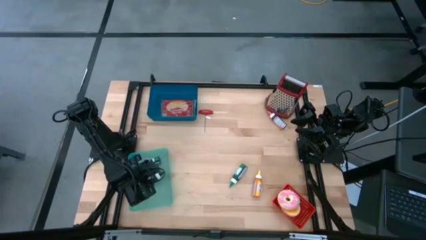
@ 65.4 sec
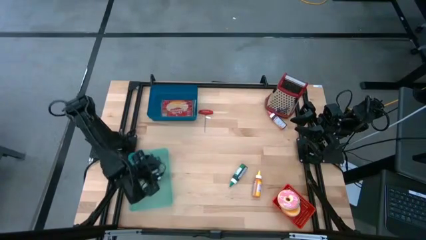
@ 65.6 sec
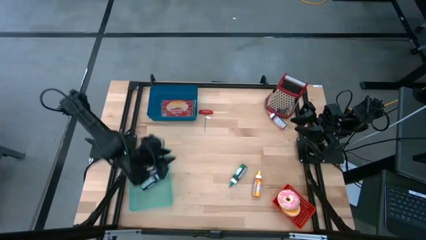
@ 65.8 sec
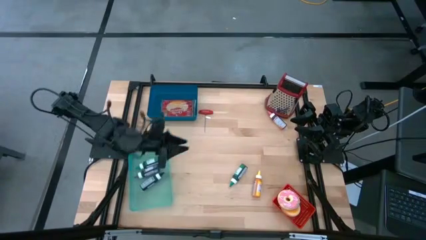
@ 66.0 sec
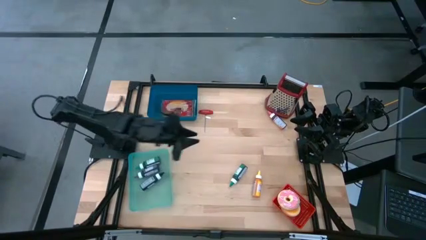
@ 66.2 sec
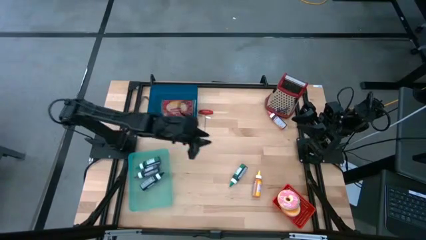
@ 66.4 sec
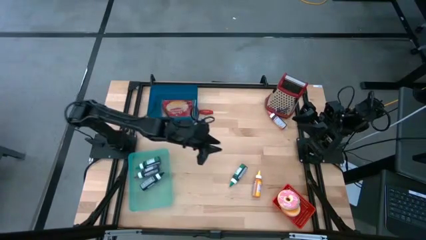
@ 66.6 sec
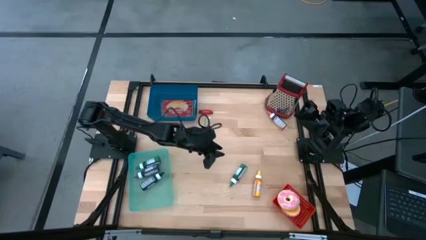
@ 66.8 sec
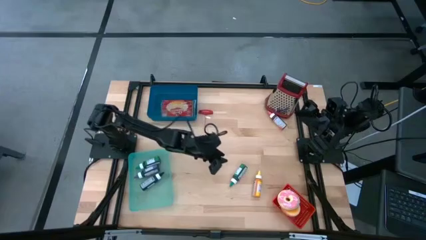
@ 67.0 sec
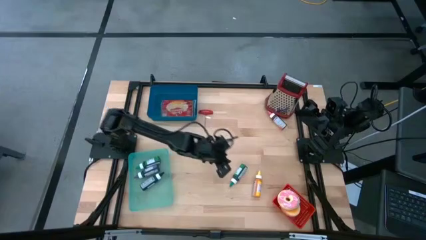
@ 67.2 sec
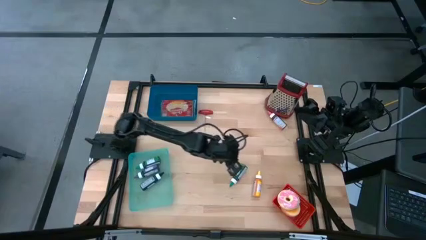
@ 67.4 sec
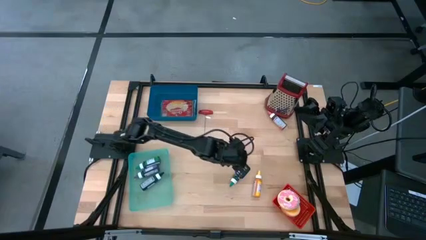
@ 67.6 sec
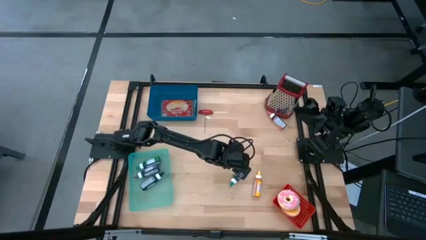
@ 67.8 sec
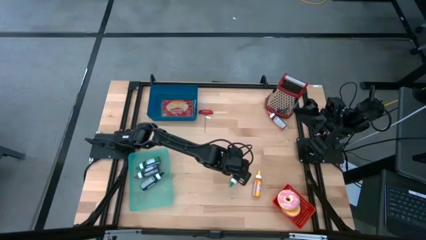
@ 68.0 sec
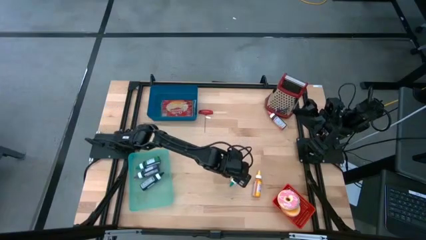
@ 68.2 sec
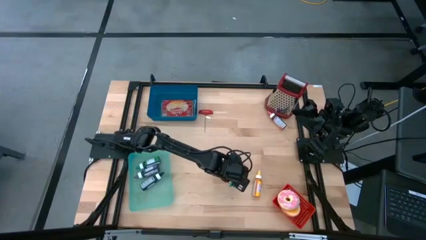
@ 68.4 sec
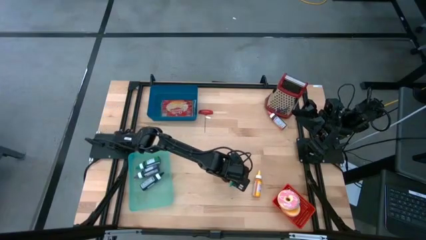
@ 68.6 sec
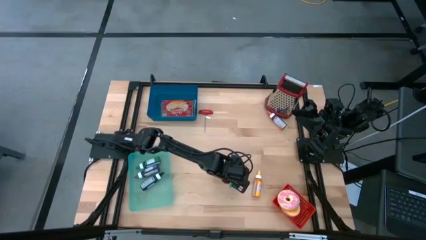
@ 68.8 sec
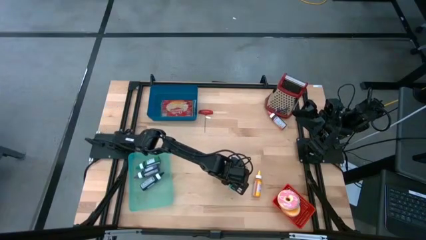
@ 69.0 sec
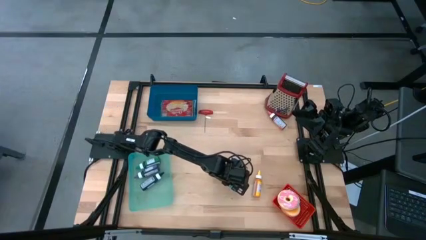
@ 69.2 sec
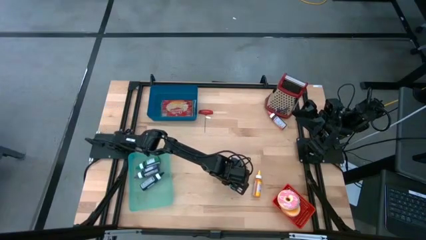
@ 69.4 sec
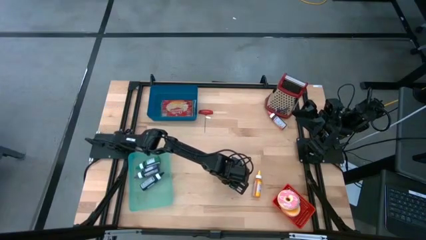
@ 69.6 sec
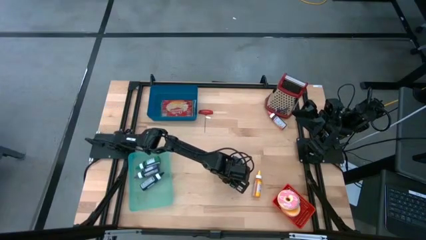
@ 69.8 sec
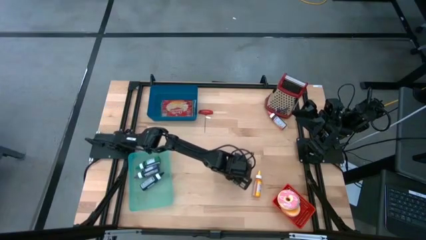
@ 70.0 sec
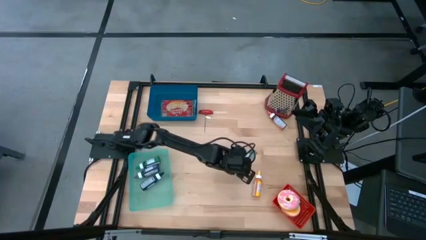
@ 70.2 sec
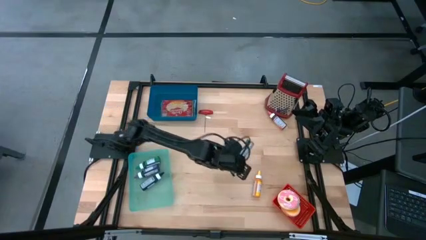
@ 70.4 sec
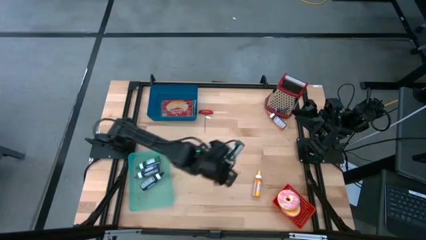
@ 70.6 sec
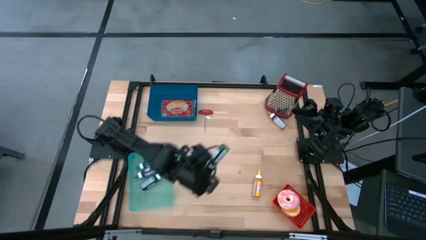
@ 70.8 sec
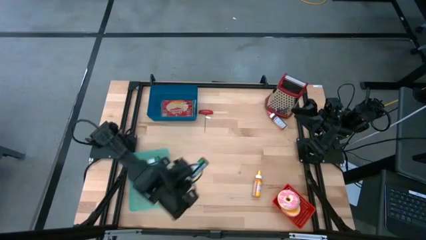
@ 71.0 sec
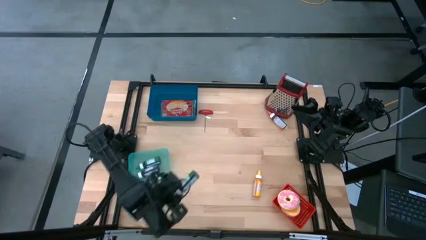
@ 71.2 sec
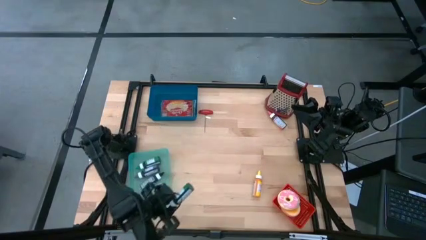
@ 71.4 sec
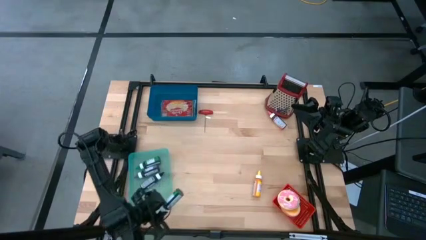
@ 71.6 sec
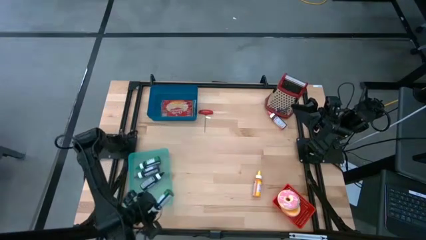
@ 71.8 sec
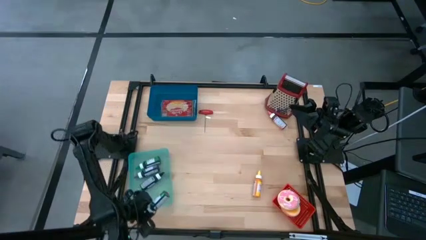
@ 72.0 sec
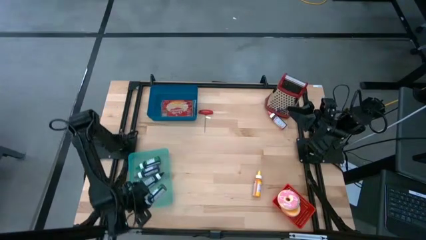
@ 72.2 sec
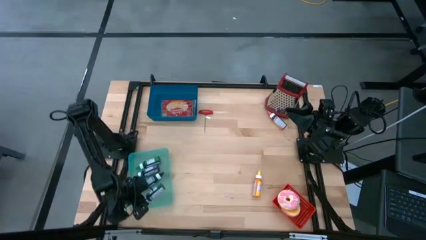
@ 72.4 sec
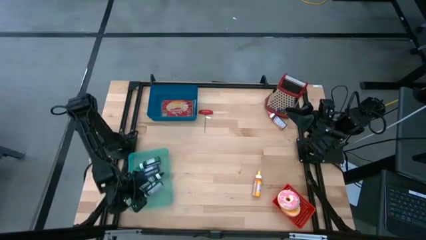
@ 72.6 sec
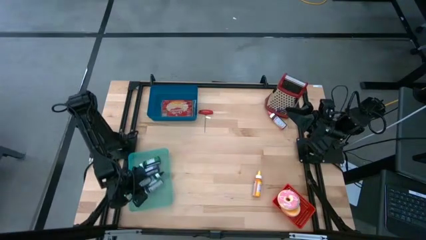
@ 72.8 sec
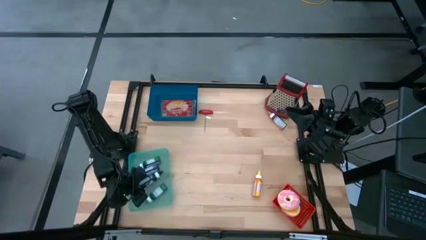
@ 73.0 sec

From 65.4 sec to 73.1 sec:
Put the green food coloring bottle into the green bin

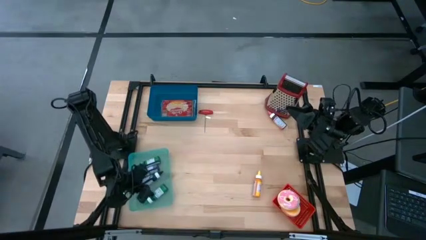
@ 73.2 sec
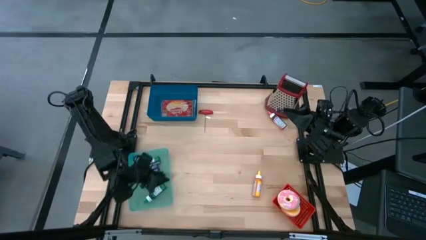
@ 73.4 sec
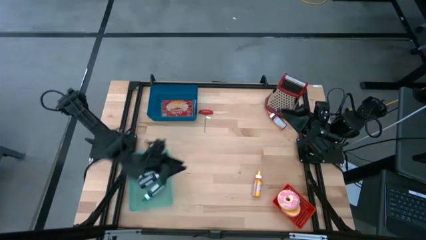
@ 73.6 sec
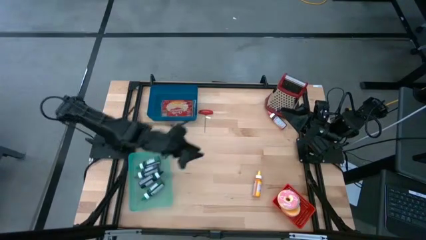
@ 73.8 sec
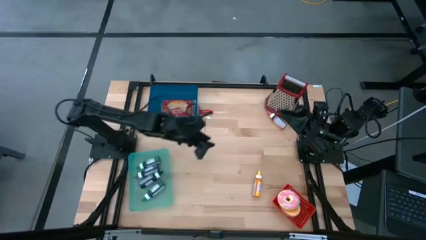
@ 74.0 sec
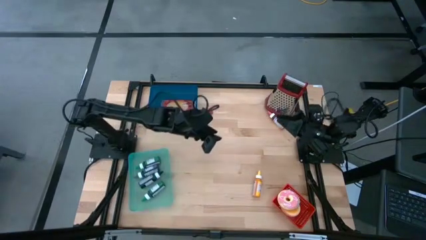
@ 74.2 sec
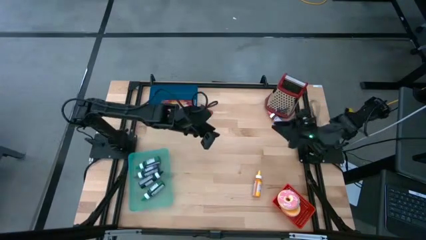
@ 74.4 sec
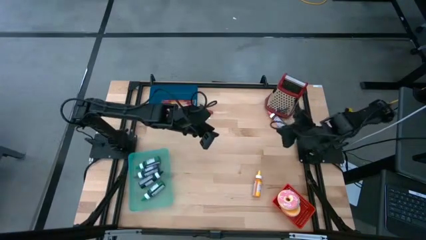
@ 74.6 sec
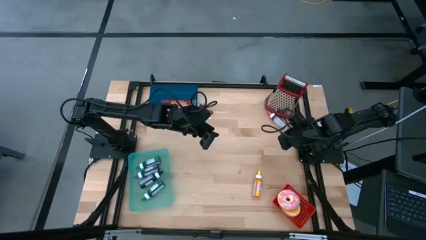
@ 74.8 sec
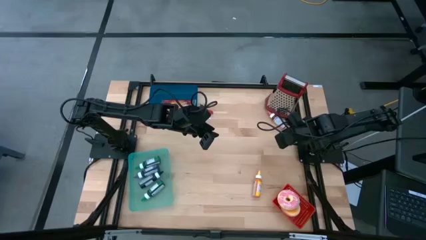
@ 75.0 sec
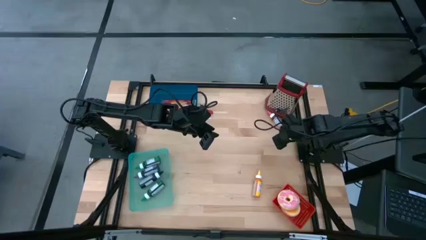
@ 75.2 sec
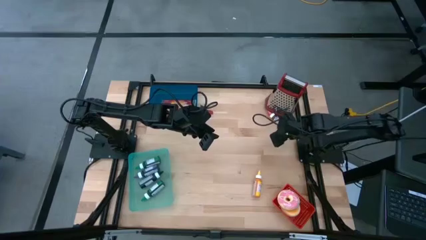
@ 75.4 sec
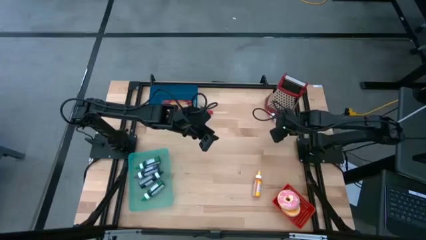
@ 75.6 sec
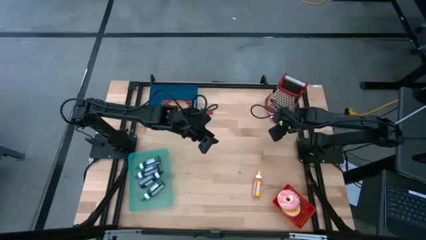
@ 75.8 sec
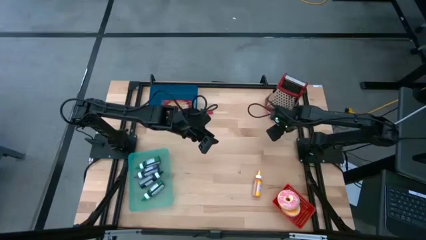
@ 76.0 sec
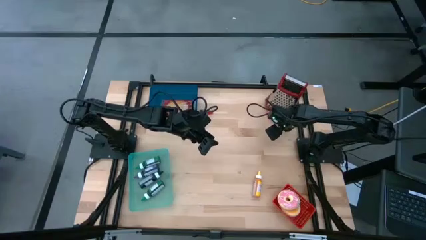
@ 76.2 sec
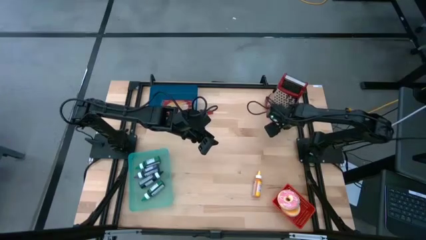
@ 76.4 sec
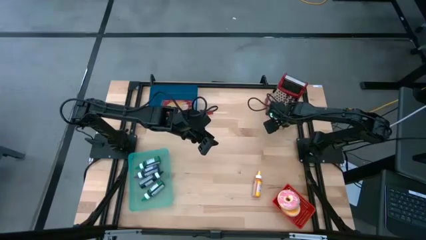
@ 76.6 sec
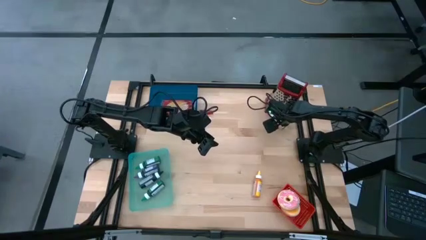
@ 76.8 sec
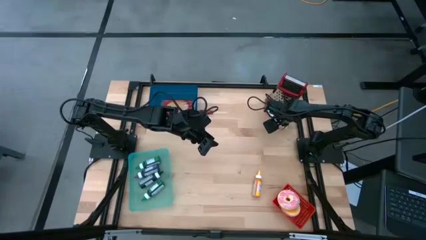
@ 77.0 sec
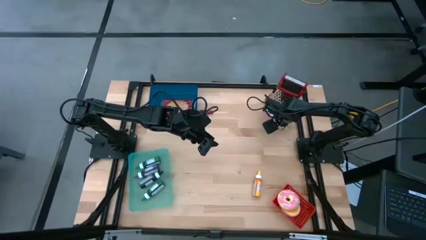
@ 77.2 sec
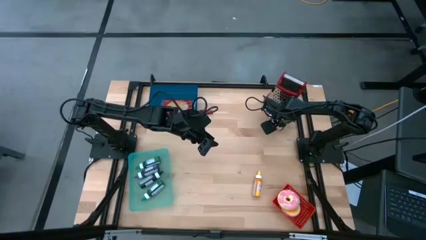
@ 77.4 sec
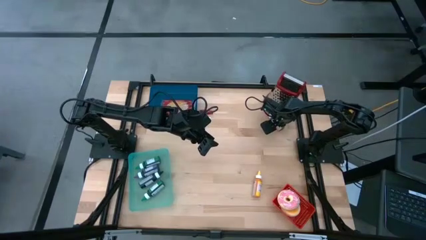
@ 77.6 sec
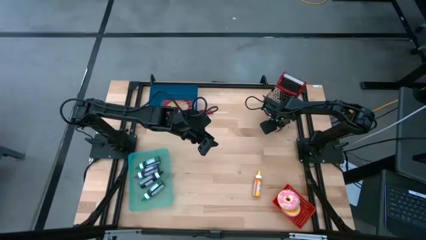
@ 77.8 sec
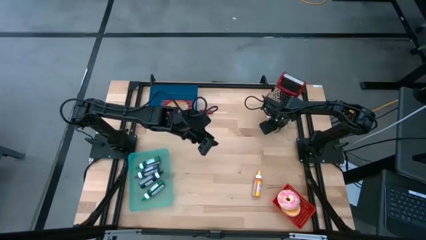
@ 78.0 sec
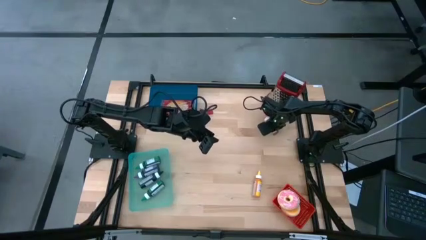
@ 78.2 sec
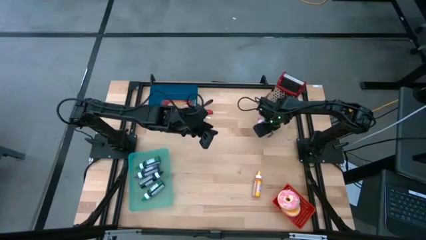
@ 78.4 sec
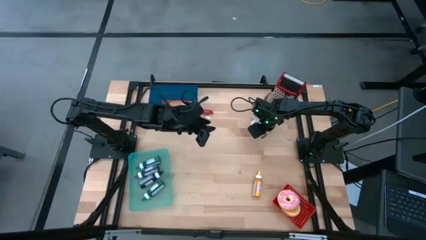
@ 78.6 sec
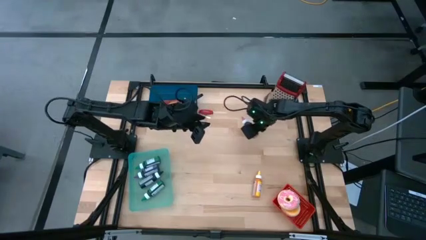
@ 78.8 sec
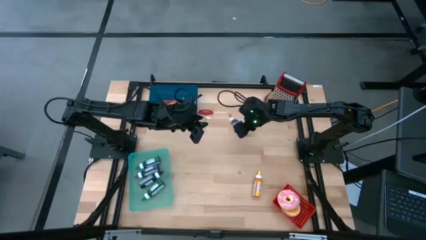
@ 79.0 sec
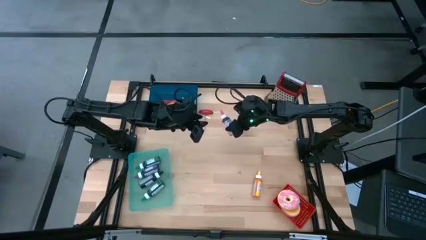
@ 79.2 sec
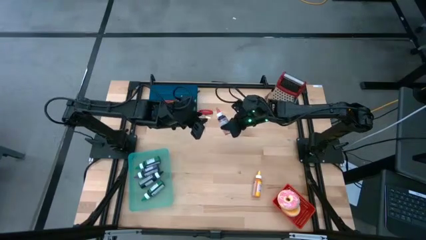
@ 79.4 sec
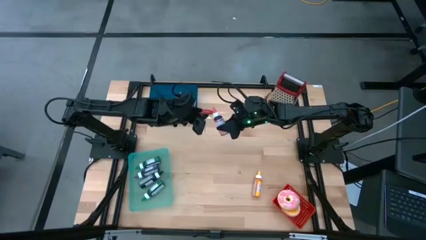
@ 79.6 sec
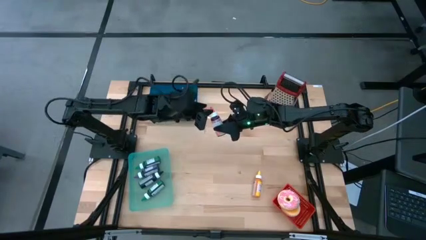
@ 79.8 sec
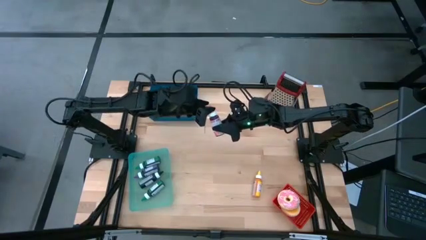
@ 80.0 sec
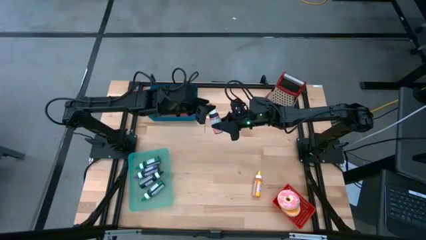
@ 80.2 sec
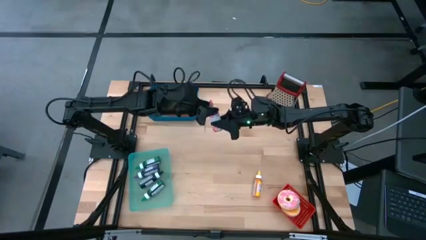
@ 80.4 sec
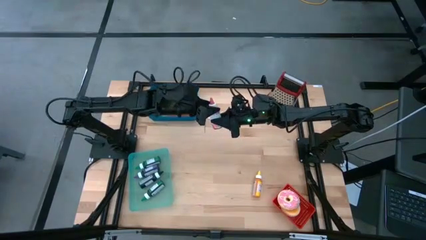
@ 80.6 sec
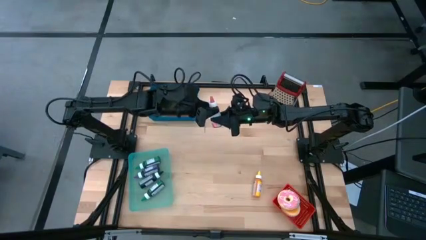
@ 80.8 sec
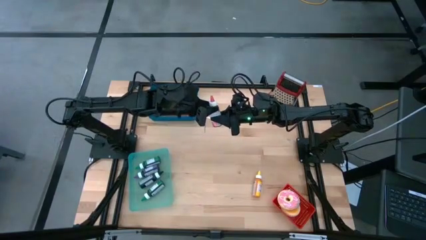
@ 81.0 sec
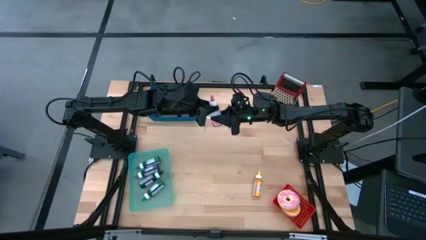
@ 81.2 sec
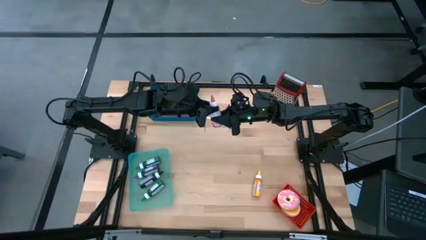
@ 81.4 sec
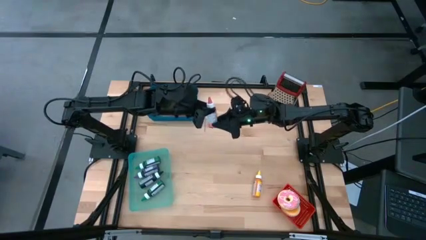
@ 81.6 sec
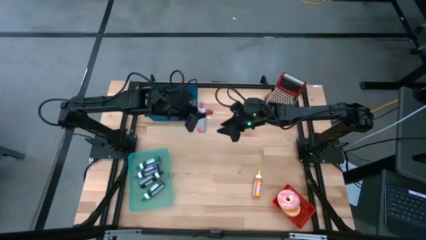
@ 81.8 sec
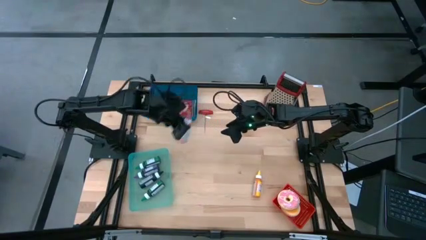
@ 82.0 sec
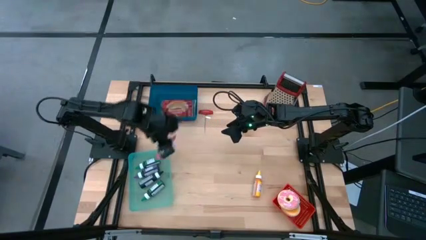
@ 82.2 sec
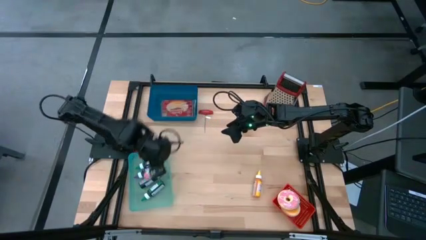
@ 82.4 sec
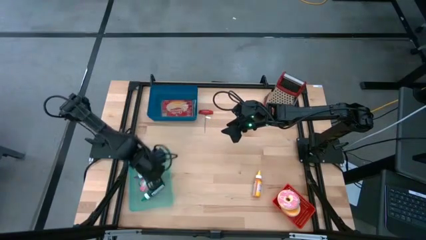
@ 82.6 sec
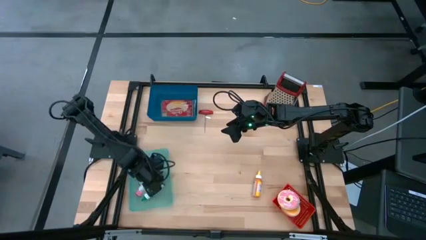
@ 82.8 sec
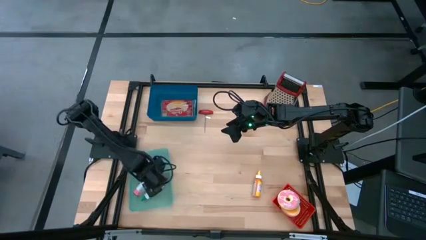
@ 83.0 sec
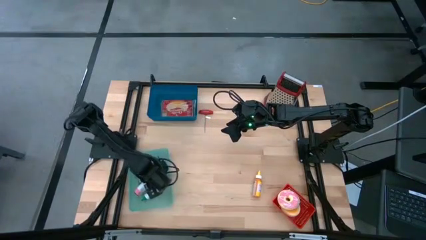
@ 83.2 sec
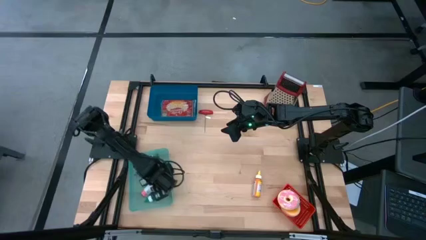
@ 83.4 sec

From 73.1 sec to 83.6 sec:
Put the pink food coloring bottle into the green bin
